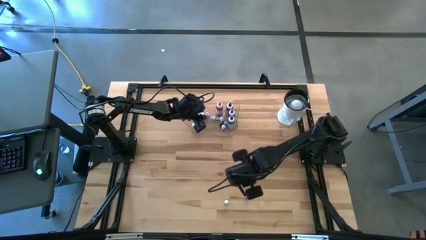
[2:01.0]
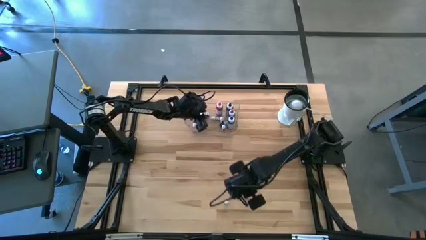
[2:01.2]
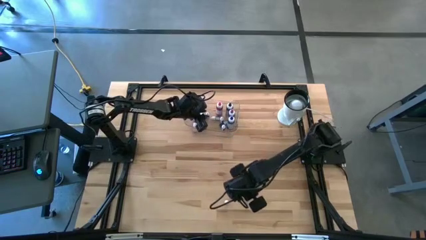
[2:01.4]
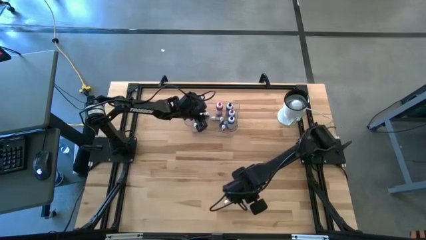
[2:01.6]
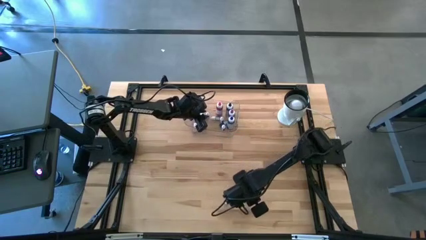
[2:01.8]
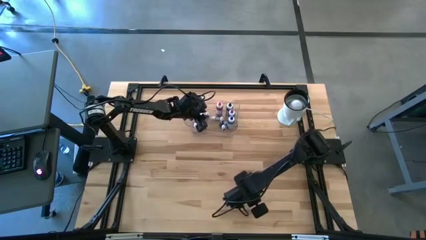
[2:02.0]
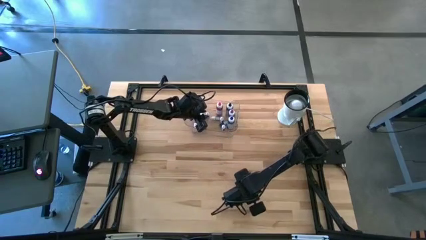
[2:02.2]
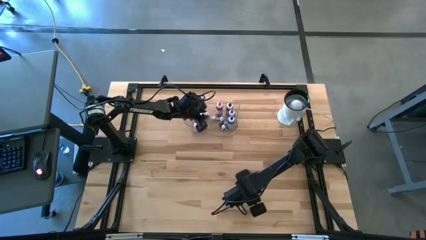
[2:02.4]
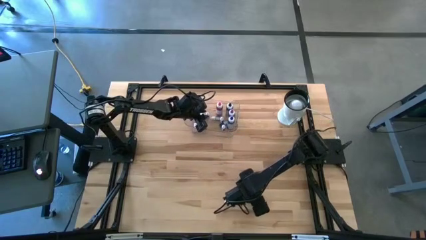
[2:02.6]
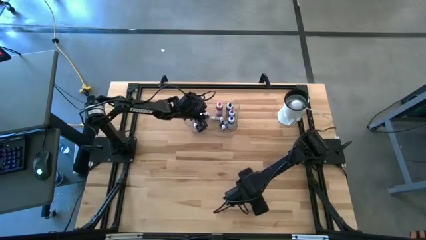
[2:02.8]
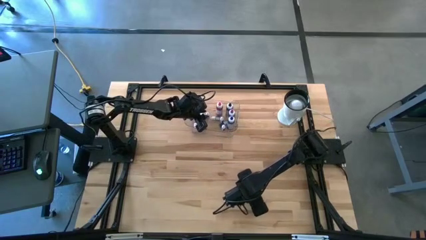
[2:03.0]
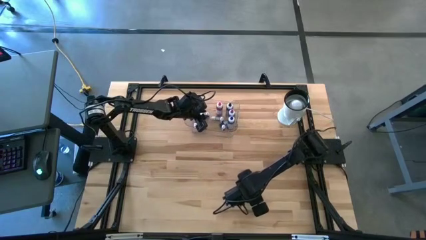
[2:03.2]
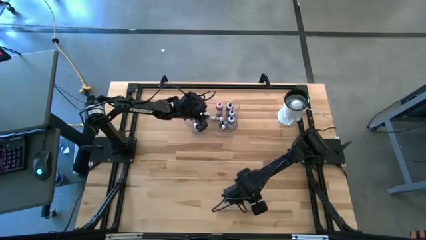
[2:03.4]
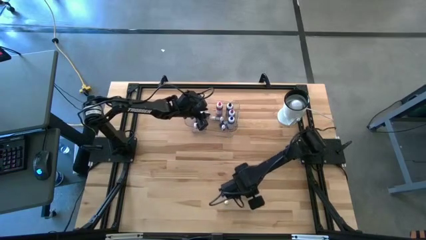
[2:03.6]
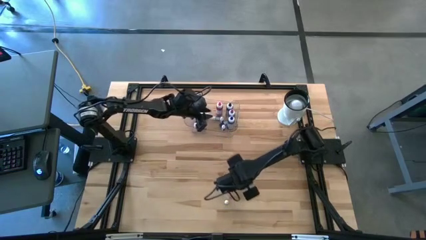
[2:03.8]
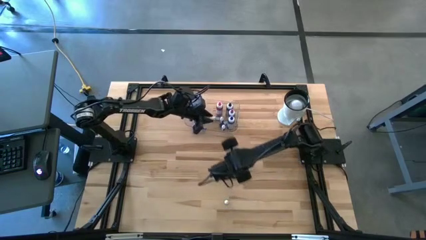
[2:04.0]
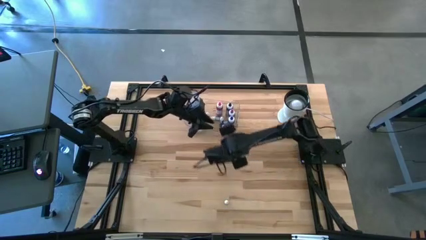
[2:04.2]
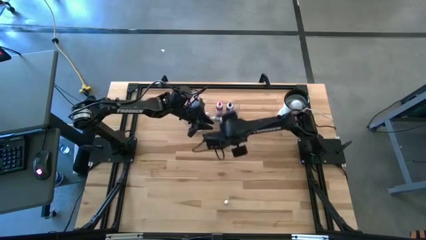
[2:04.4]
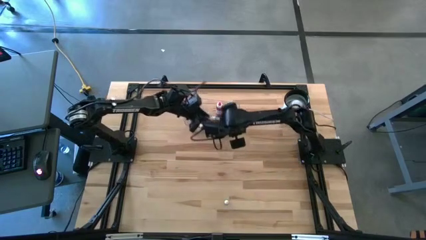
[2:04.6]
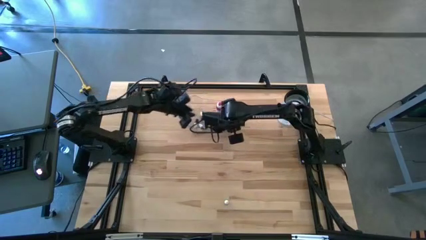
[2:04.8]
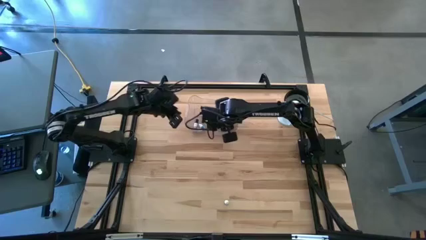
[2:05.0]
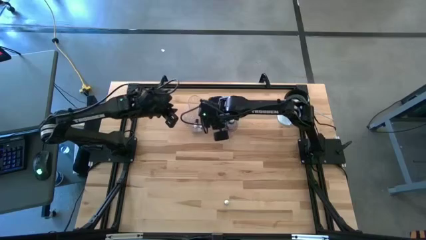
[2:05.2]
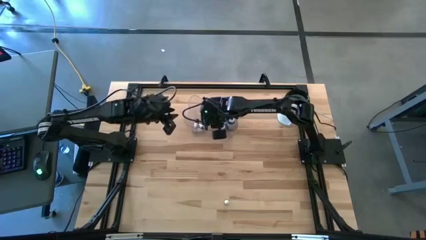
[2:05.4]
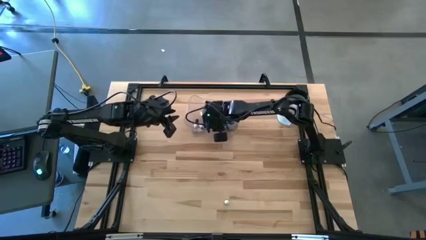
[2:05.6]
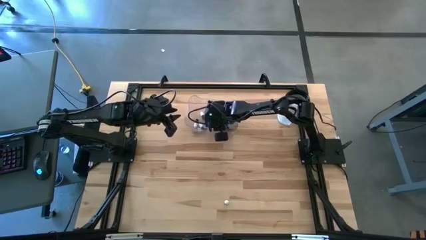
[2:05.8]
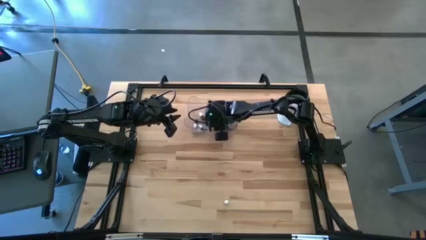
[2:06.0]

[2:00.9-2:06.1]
Task: Pick & Place food coloring
Put the small red food coloring bottle into the transparent bin

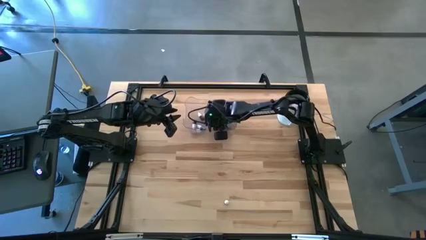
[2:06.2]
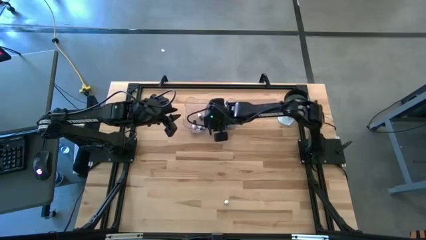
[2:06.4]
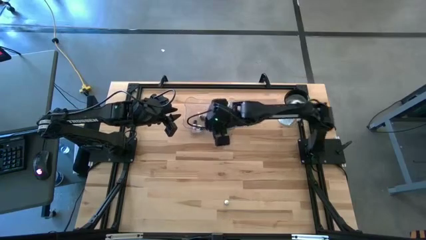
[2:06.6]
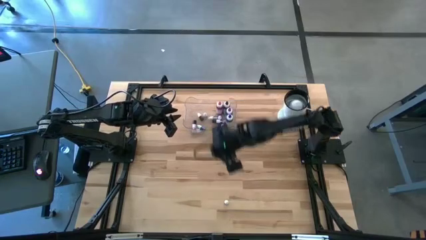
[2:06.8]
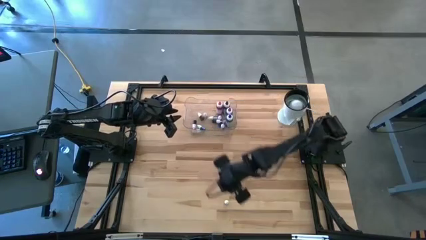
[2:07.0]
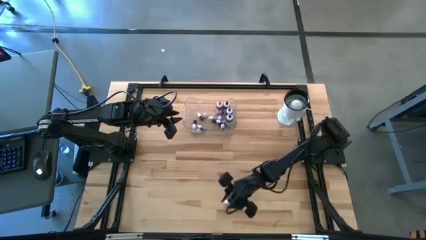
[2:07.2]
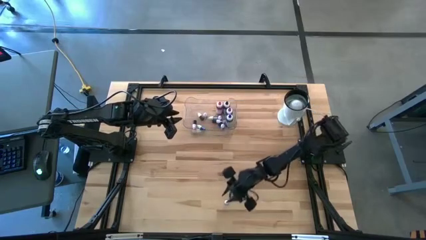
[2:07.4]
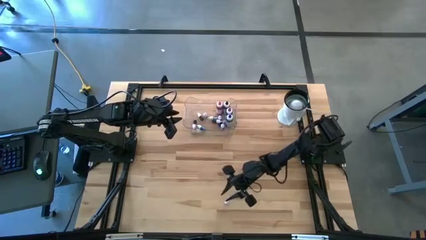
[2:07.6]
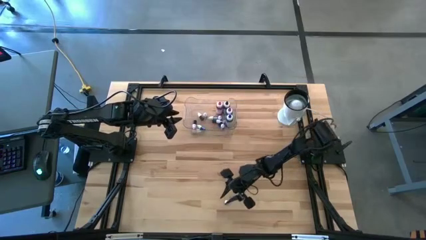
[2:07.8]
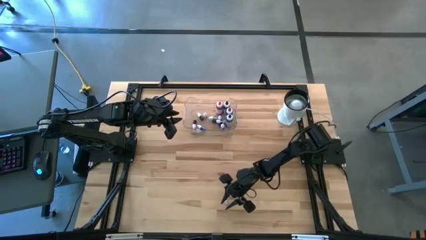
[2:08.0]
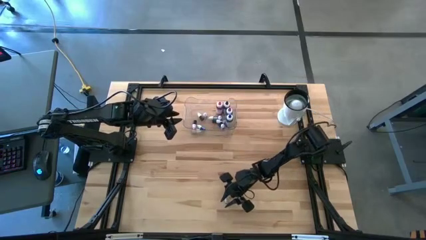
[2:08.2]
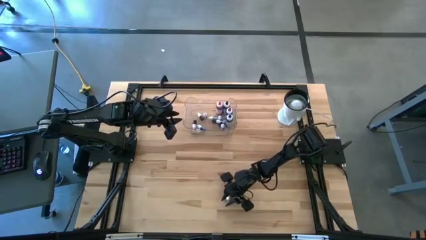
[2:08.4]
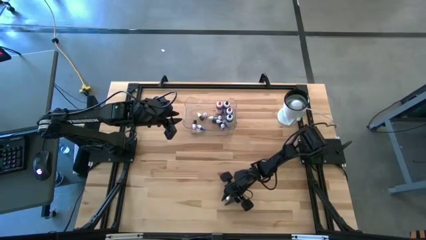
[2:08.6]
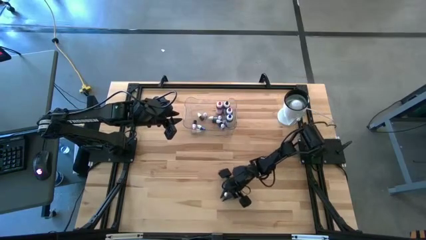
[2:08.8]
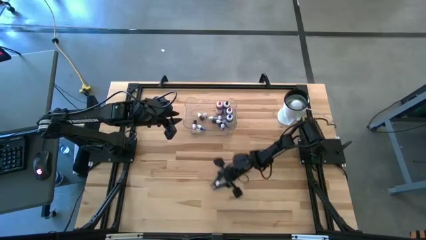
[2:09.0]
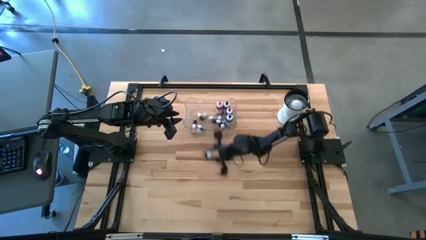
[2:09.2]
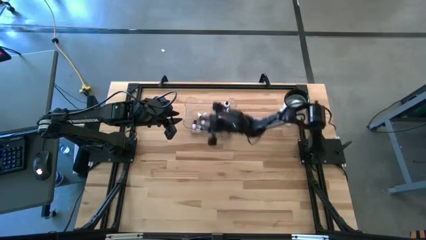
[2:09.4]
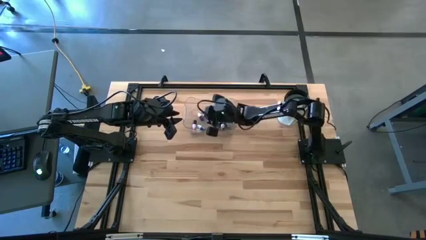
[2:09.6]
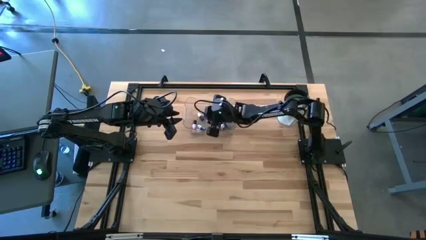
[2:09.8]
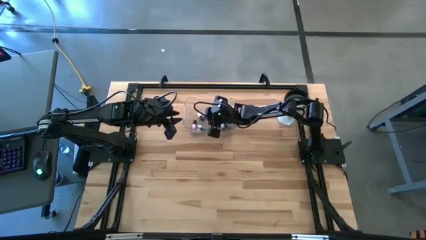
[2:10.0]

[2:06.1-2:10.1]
Put the small green food coloring bottle into the transparent bin

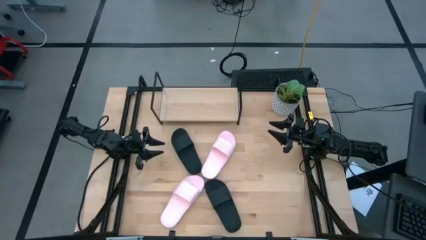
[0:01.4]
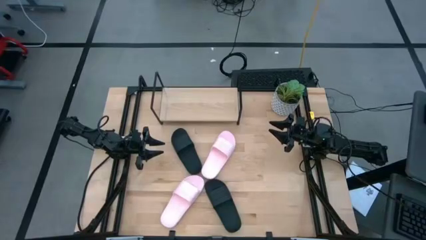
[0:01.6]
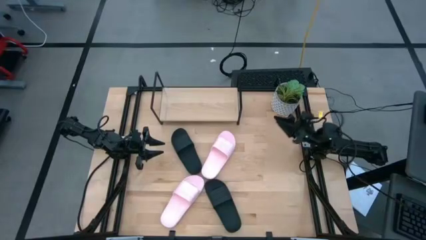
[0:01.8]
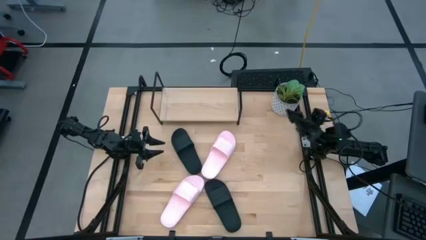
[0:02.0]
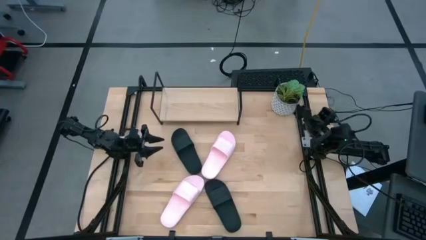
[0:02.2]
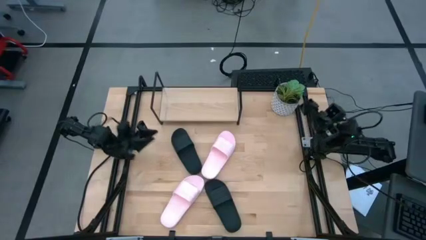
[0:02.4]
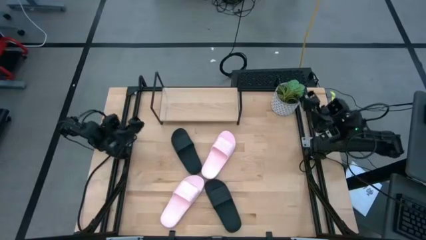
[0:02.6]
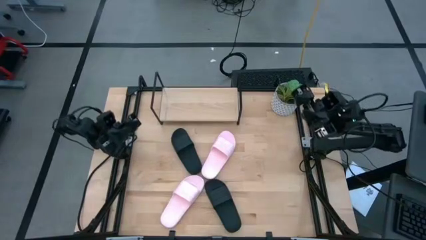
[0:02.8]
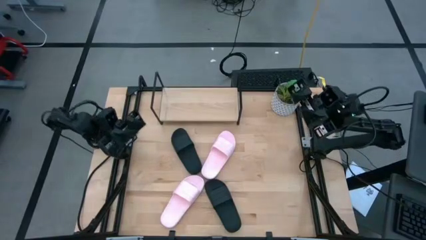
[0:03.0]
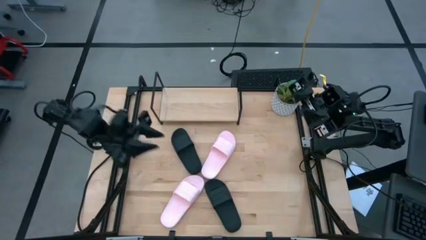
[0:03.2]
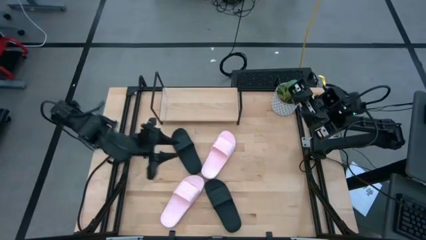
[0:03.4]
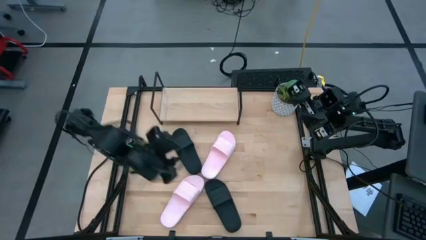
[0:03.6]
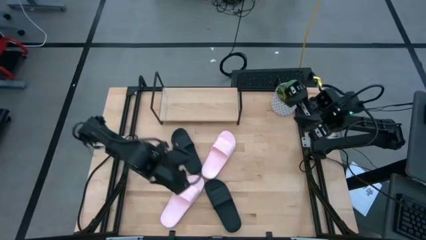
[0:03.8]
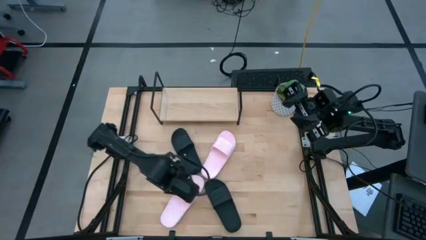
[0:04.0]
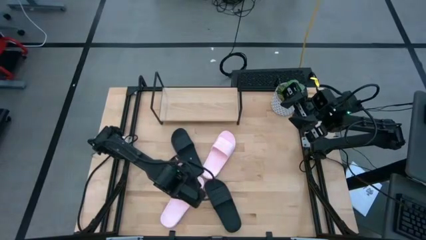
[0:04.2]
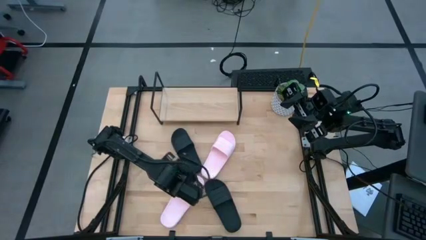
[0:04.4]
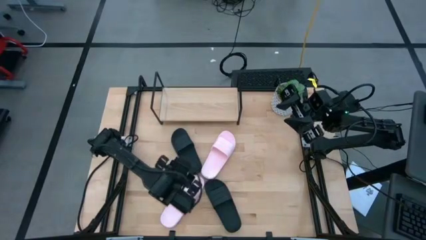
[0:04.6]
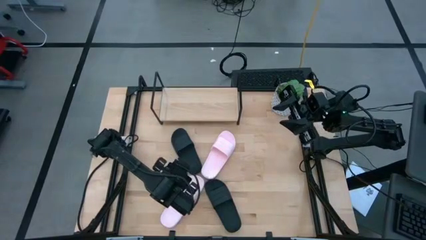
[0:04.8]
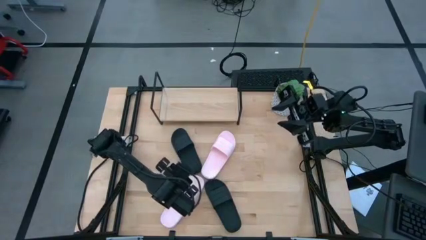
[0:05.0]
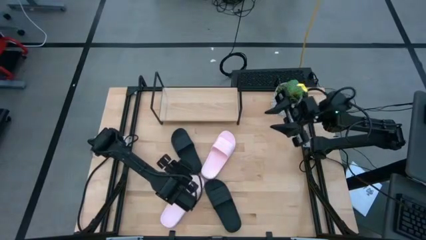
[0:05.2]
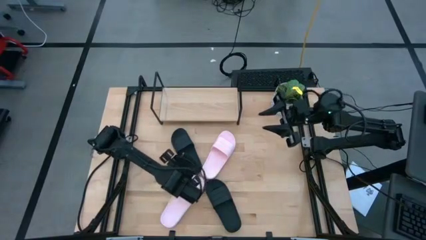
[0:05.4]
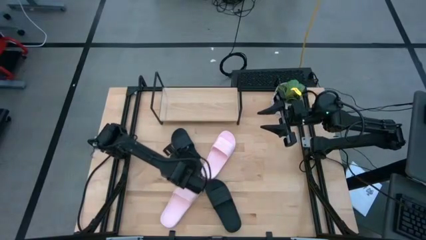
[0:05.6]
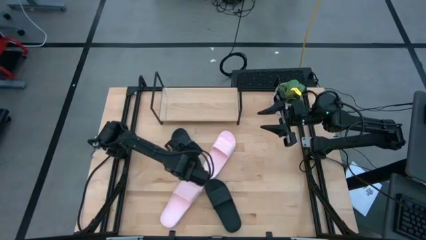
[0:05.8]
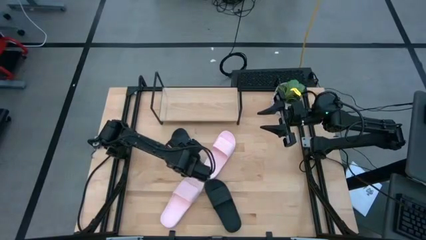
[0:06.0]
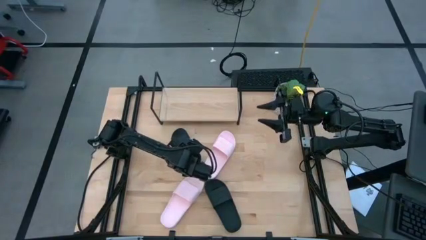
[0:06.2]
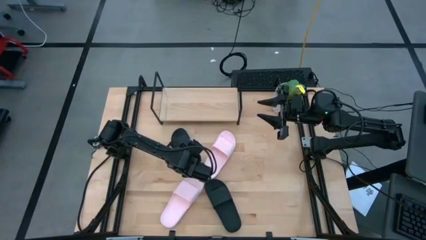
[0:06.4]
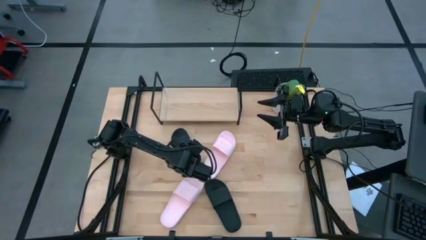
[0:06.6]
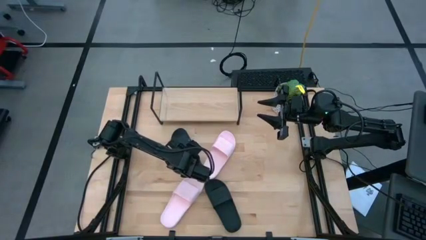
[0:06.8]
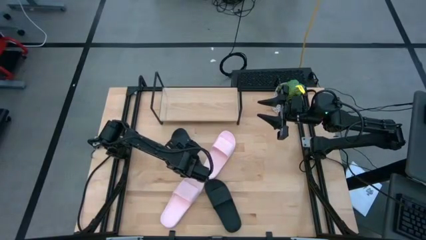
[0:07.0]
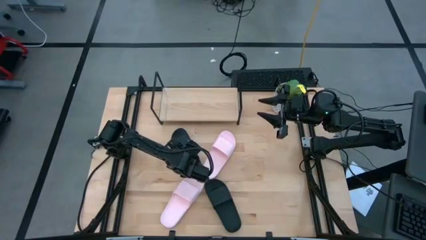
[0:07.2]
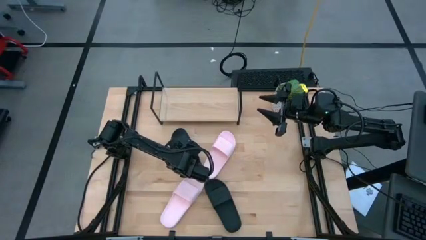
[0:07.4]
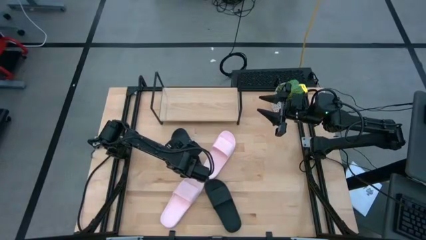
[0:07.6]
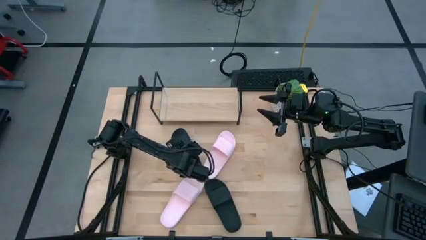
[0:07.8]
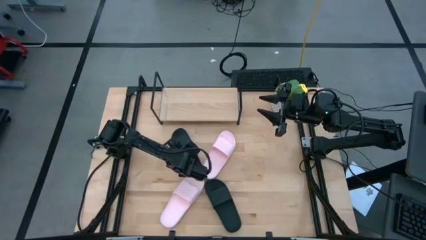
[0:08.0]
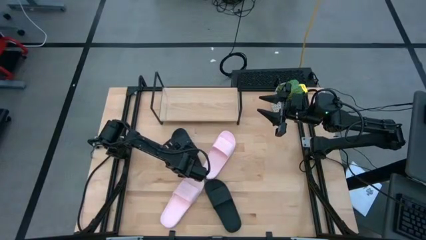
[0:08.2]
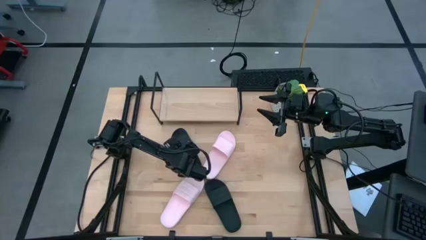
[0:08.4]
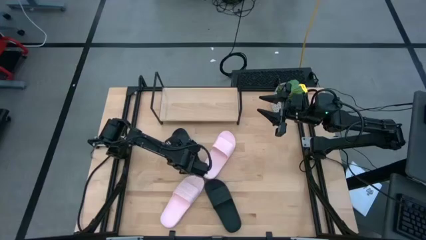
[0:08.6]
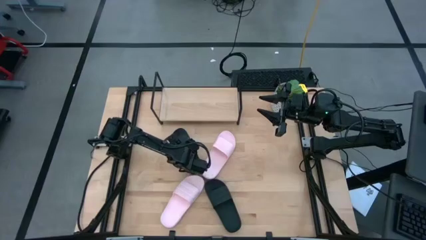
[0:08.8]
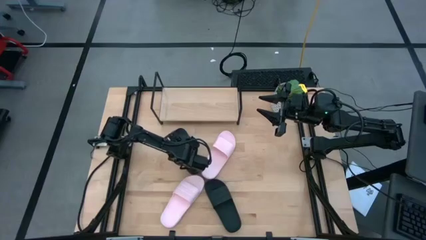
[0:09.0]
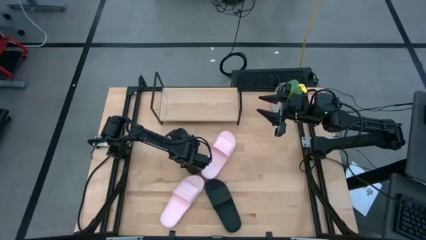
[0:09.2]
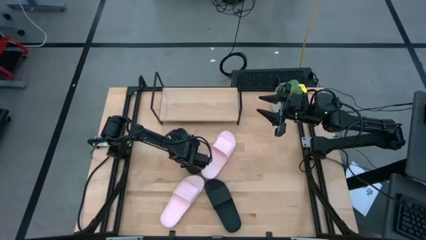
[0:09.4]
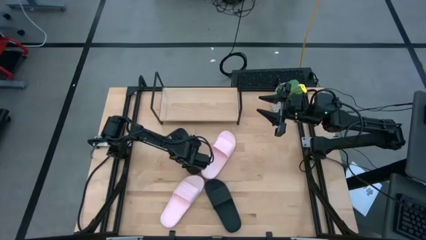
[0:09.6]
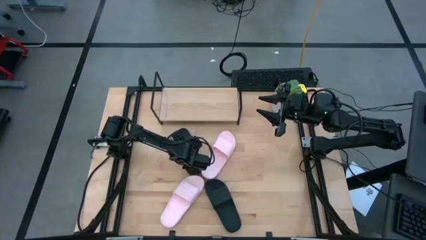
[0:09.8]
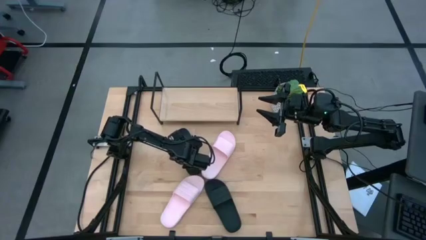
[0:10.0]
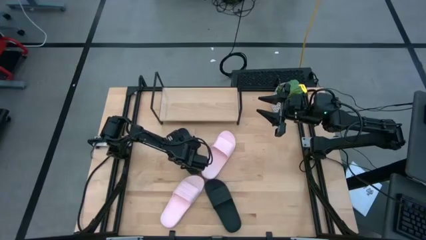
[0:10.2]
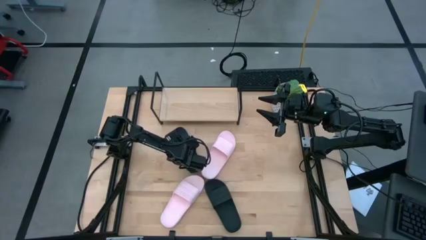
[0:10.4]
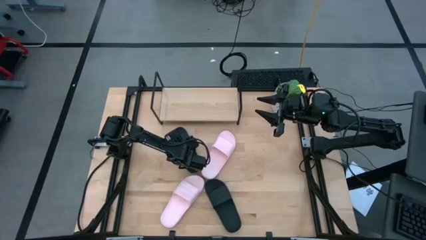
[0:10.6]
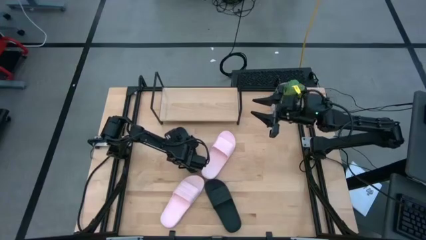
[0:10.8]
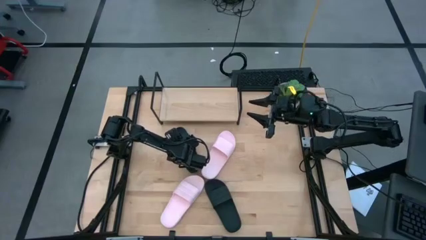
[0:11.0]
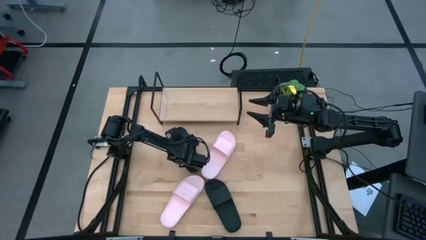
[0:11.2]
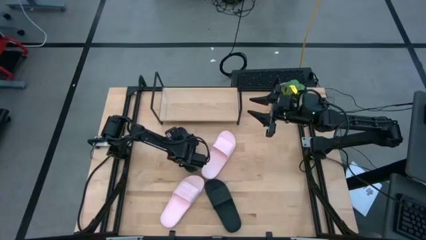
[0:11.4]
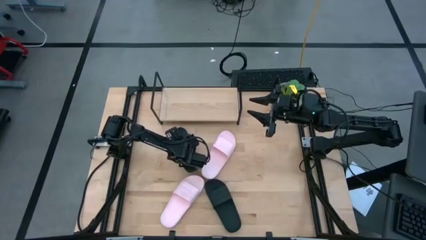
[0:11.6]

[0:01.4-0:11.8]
Task: Pick and place slides into the shelf
Put the top black slipper on the shelf
